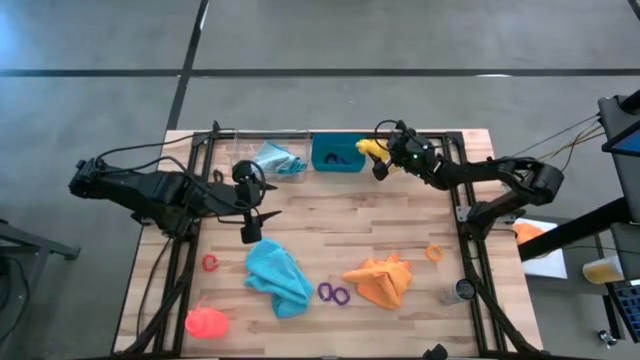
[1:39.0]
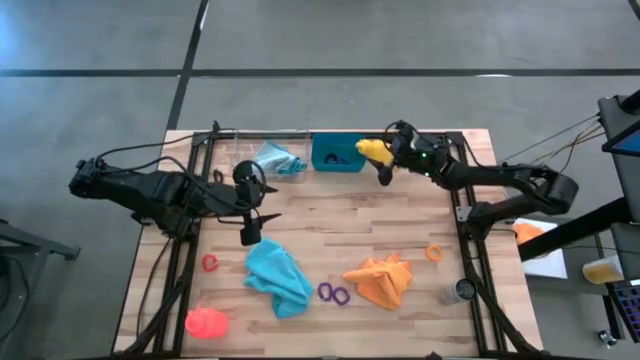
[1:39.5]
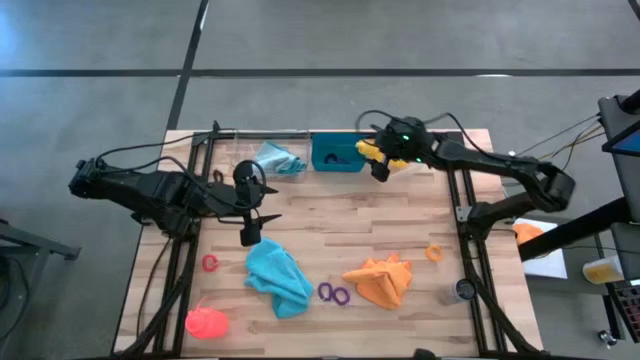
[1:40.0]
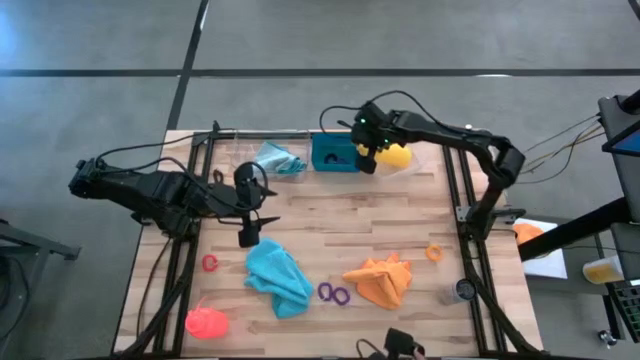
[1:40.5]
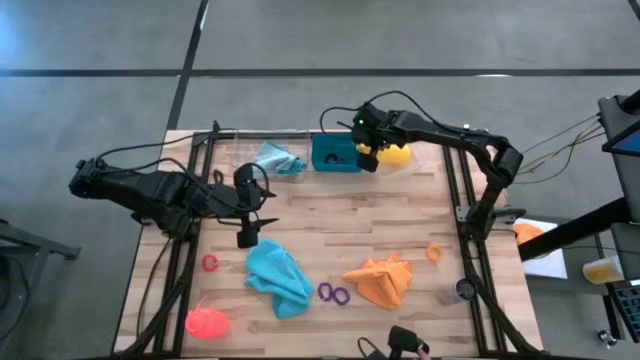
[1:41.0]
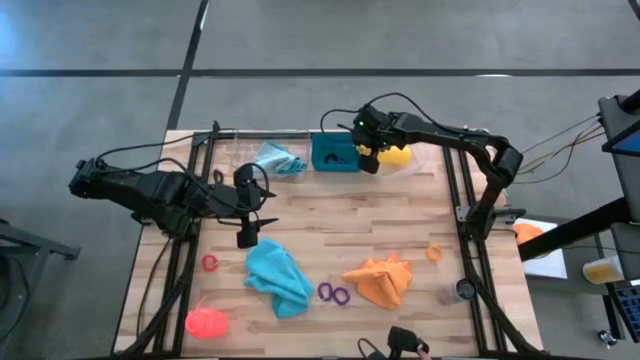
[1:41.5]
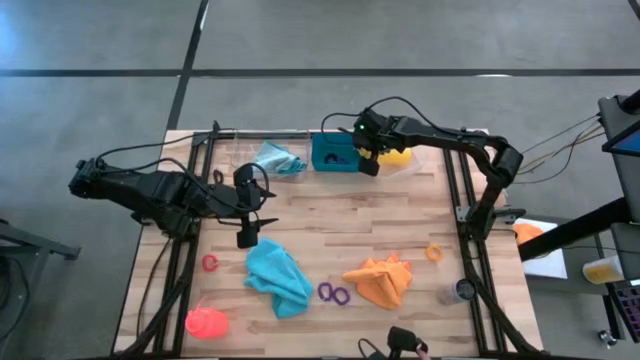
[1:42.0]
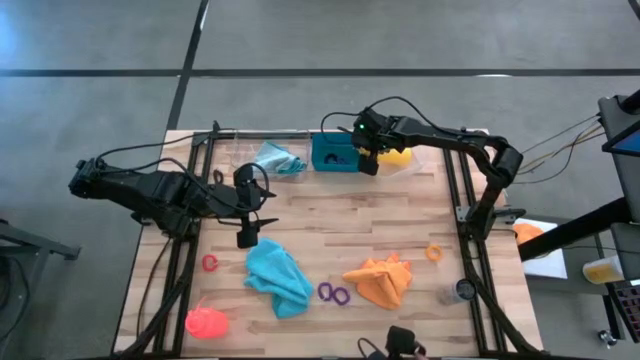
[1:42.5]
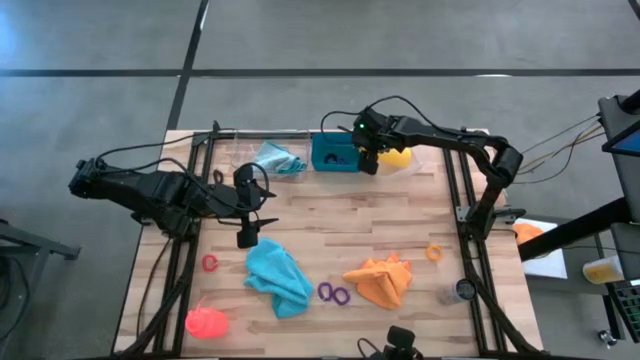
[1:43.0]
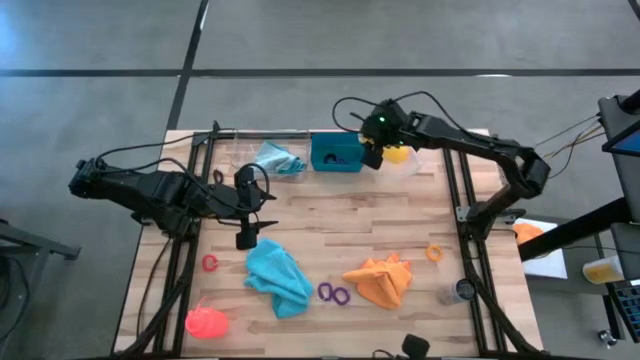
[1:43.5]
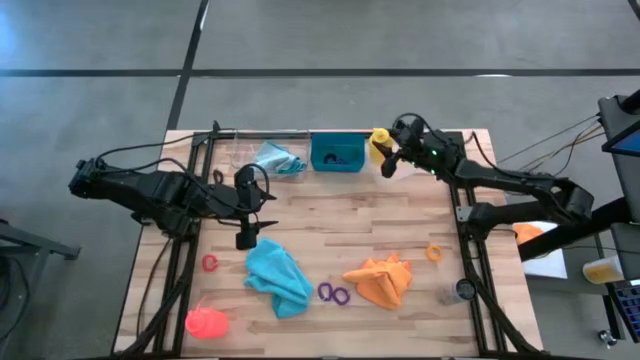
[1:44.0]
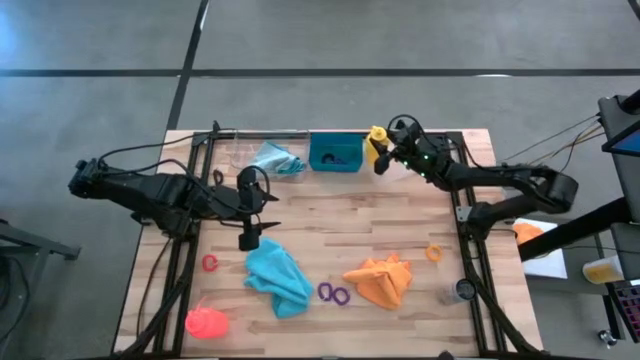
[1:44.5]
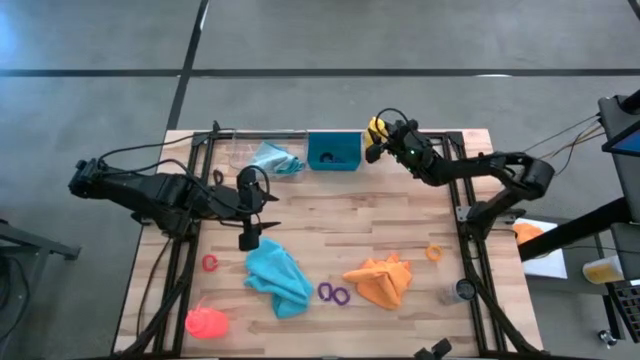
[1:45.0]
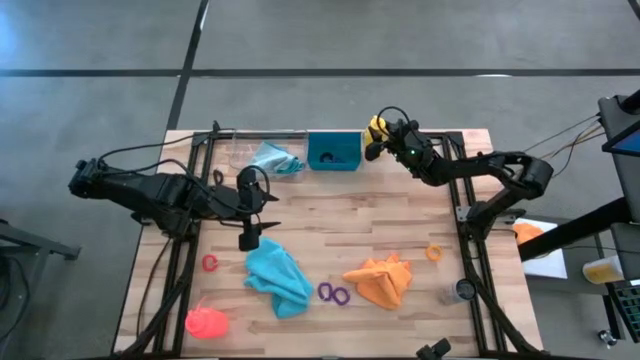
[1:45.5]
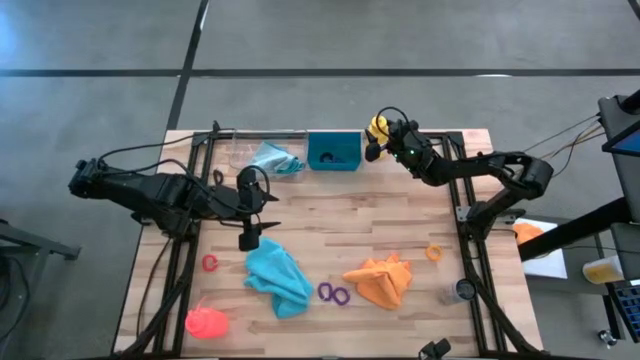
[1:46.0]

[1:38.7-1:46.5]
Task: Pick & Place Sports Items
Put the yellow water bottle into the white bin

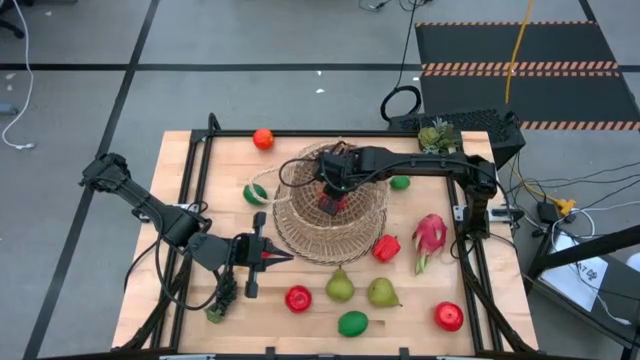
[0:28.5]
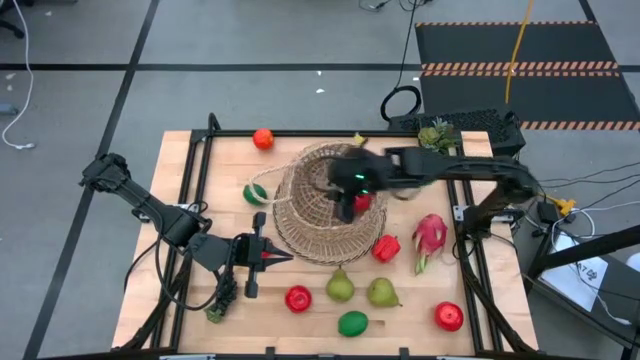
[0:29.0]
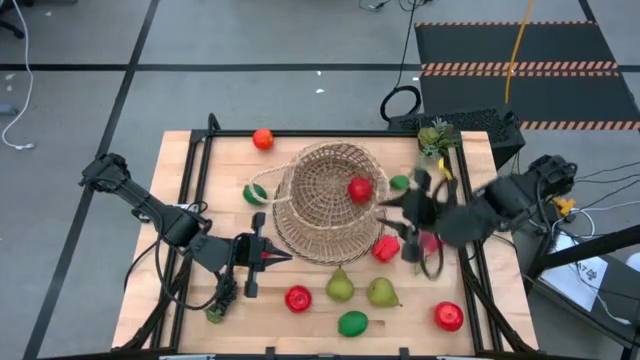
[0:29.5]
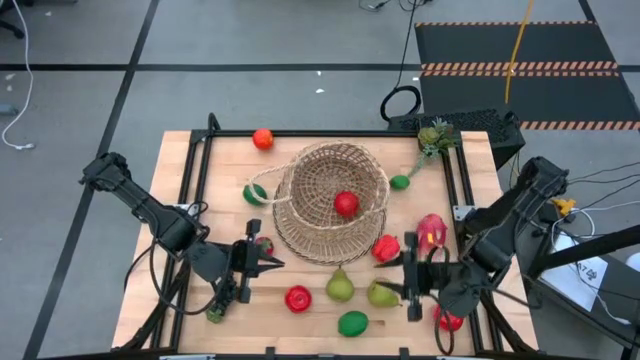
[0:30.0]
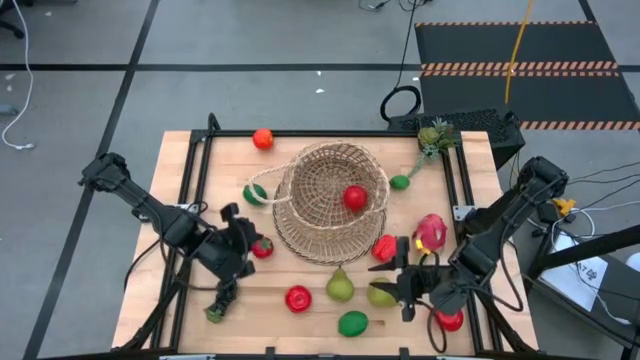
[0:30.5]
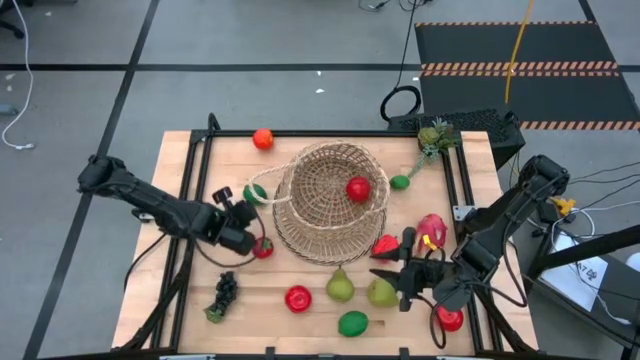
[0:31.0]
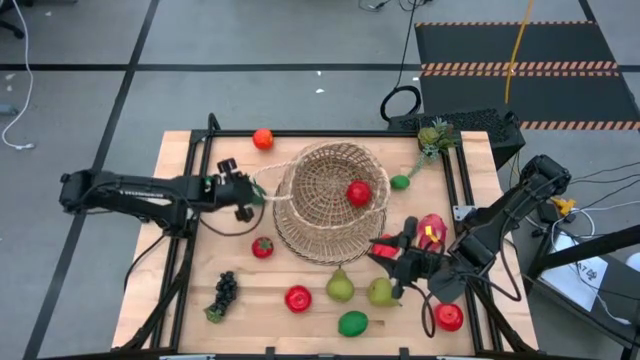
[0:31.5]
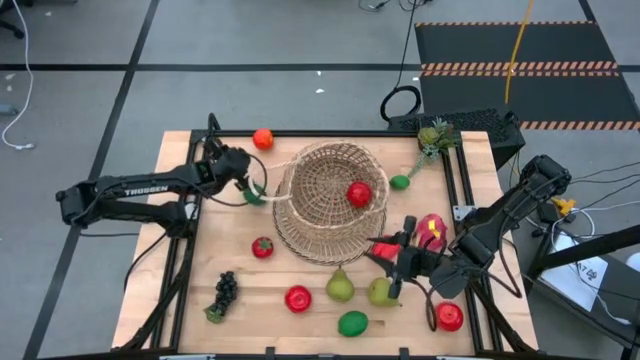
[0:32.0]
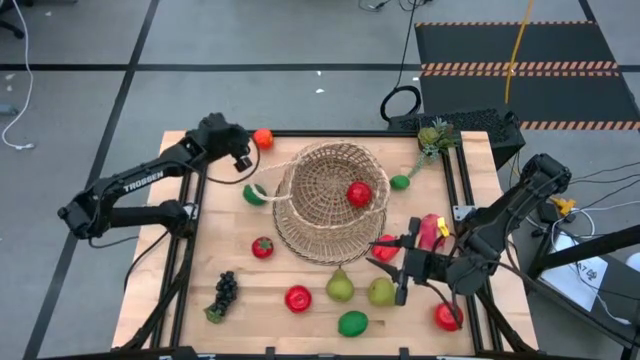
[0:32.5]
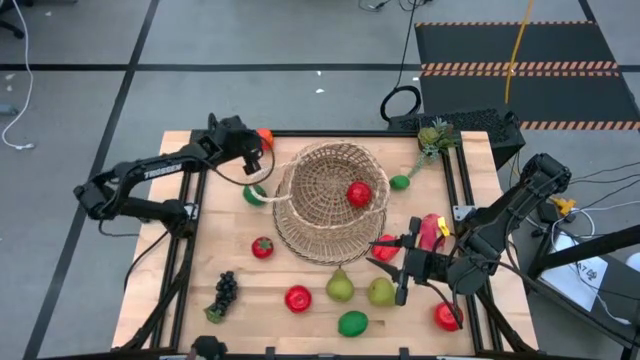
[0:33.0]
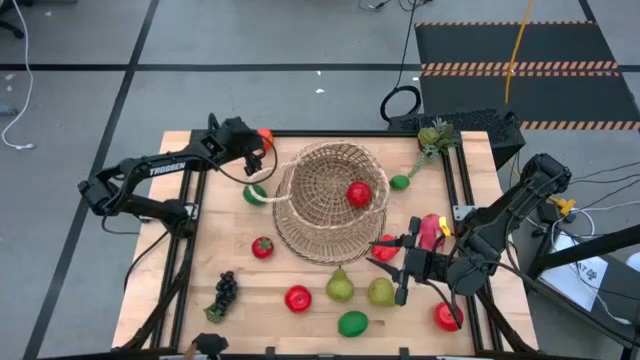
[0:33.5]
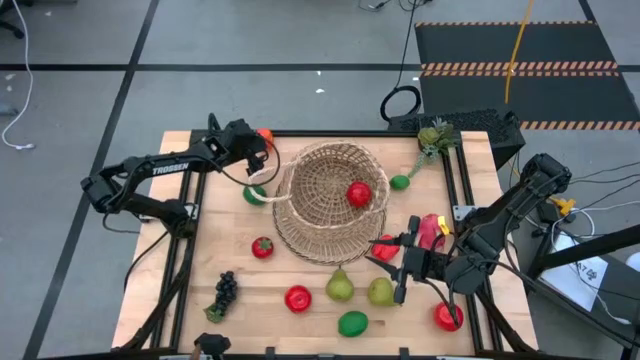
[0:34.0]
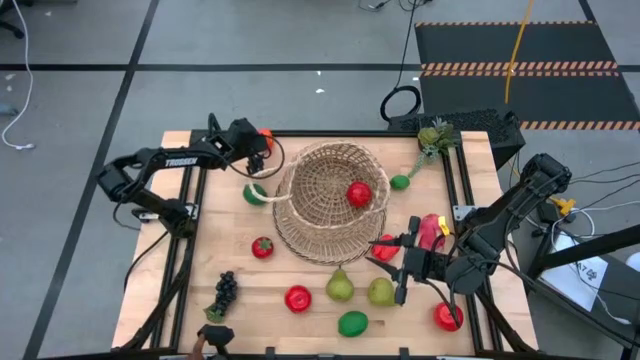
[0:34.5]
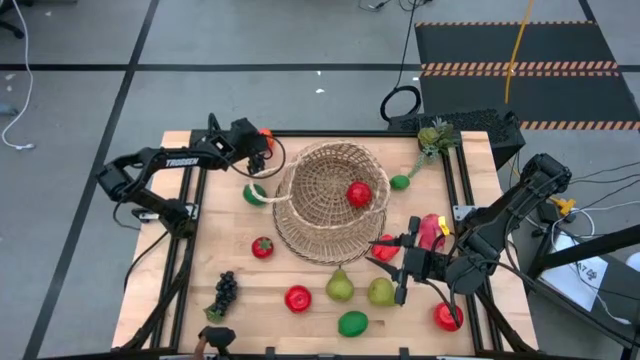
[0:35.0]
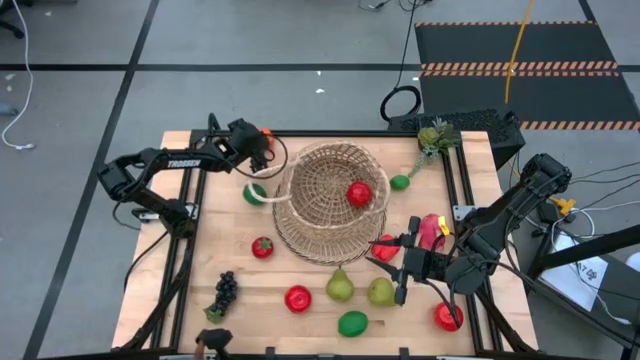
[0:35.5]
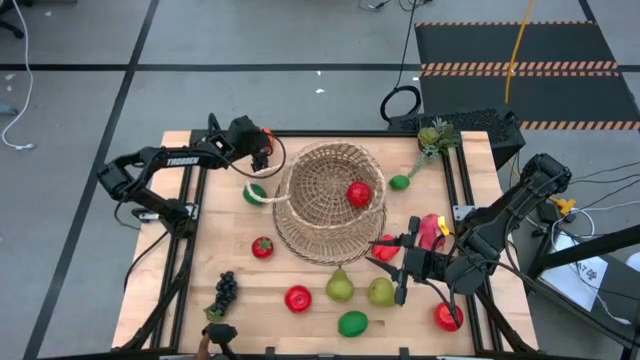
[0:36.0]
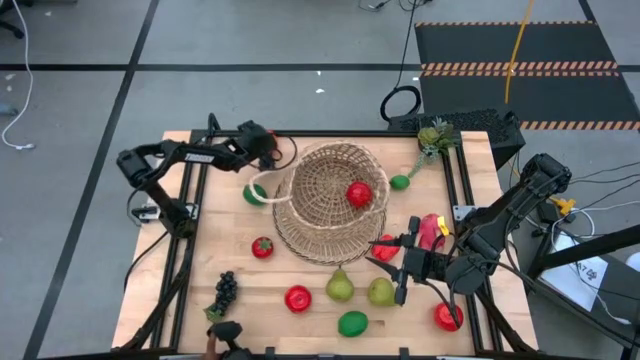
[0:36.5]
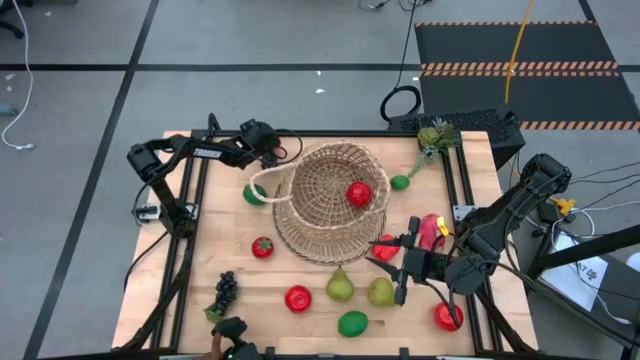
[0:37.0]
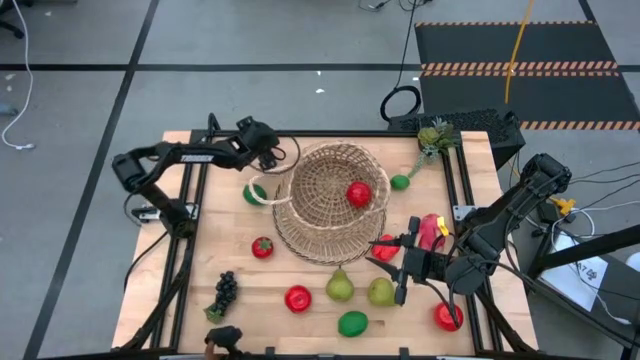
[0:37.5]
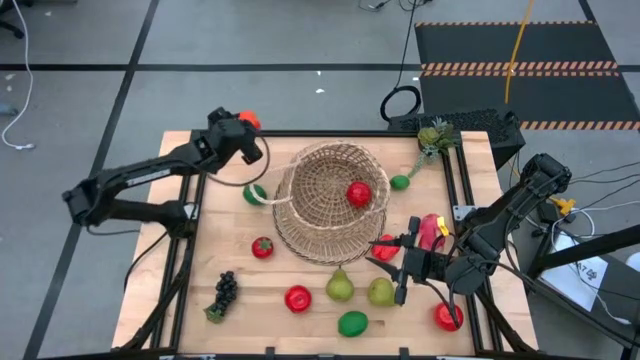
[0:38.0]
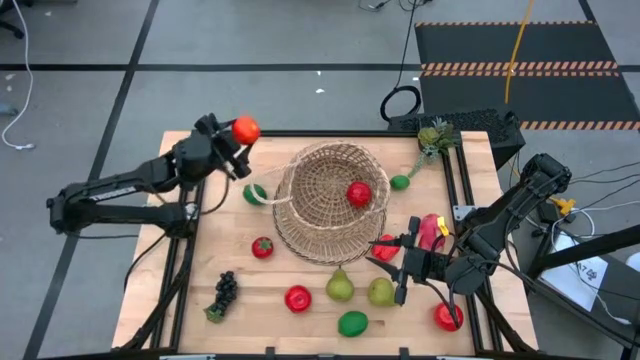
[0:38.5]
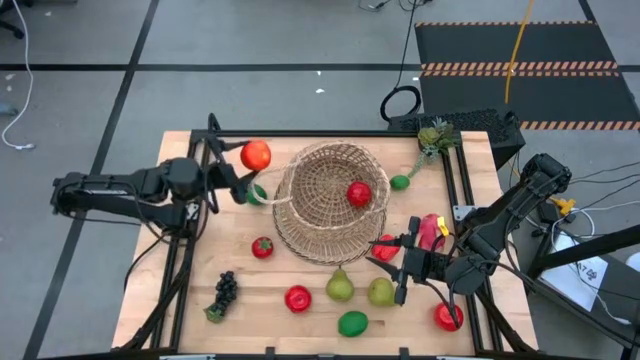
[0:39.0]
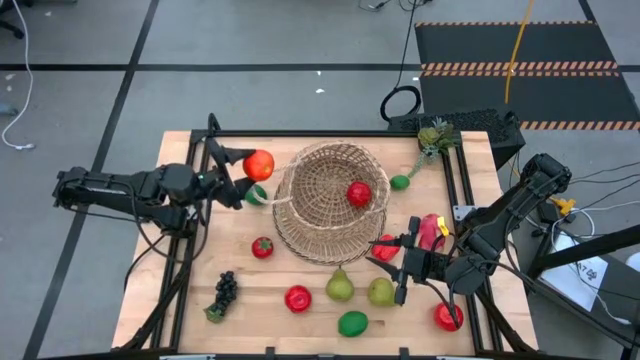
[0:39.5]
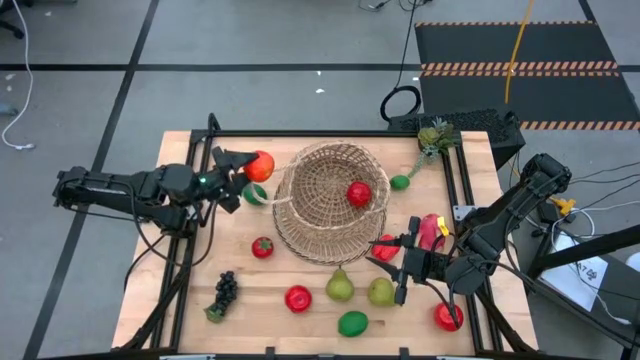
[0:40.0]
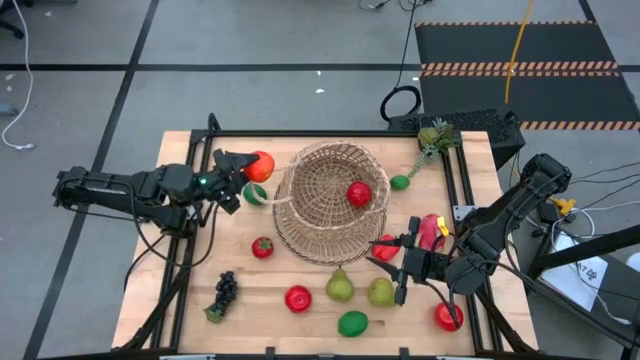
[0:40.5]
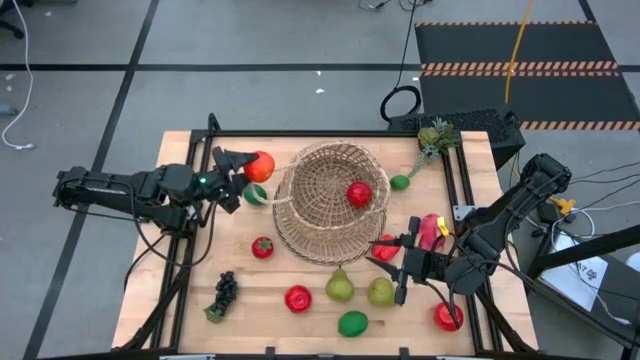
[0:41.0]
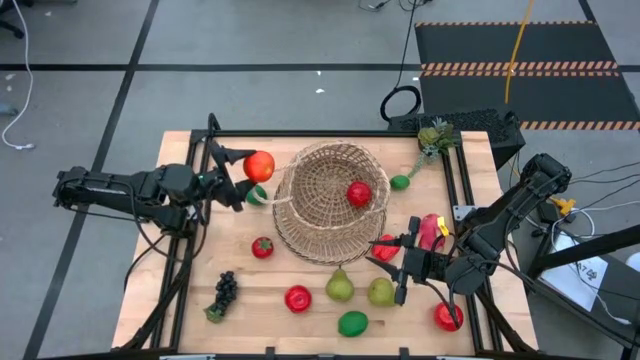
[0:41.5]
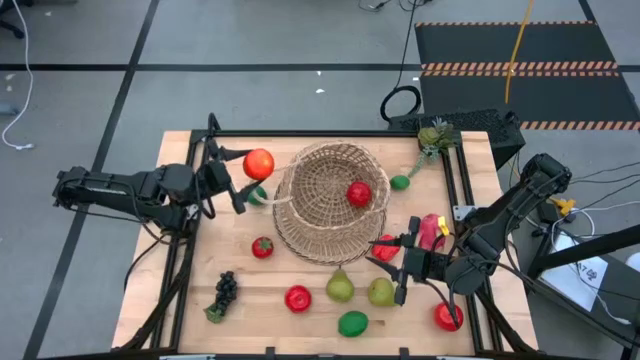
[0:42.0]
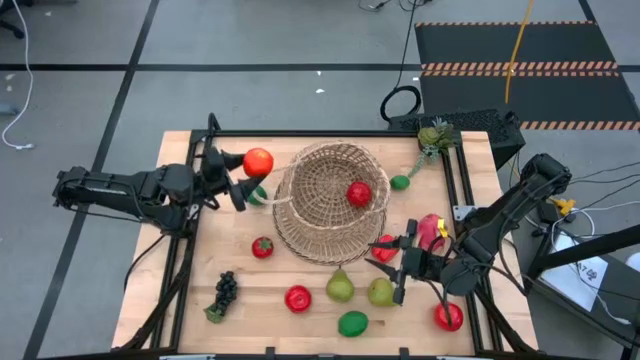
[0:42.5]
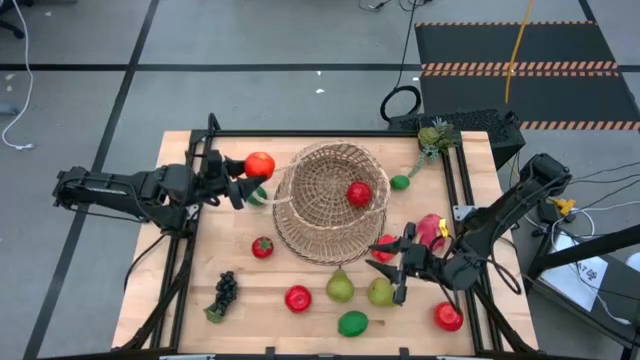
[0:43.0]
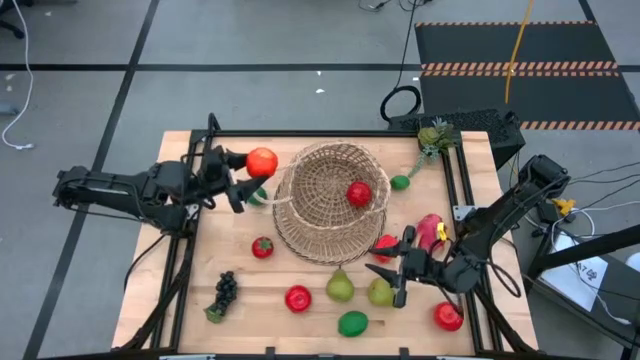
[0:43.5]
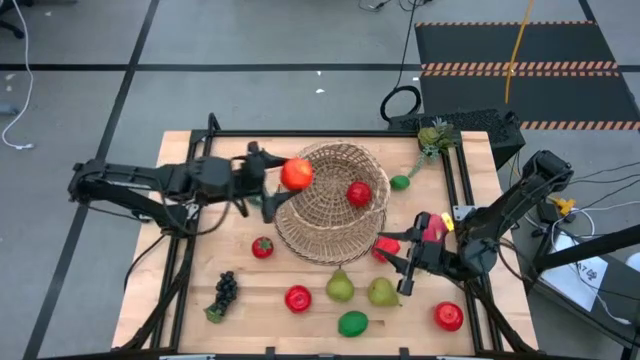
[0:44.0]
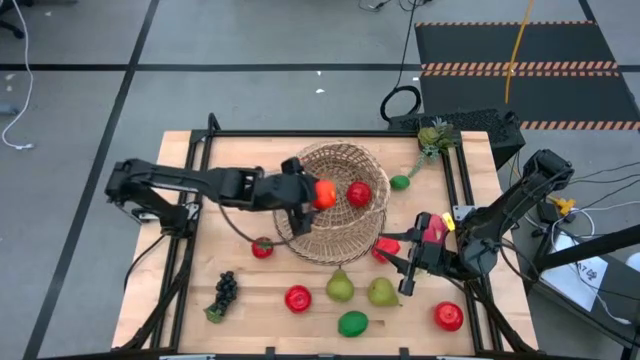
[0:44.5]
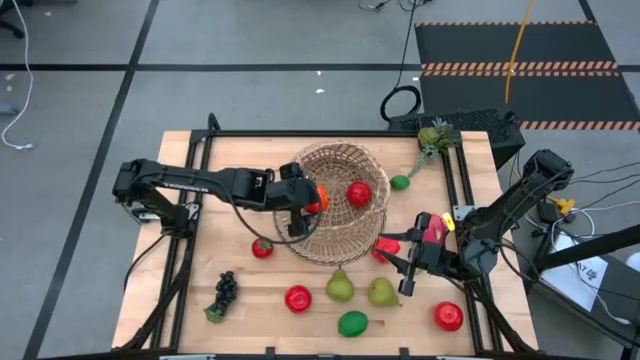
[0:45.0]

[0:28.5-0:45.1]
Task: Build produce basket
Put the top orange apple into the basket
